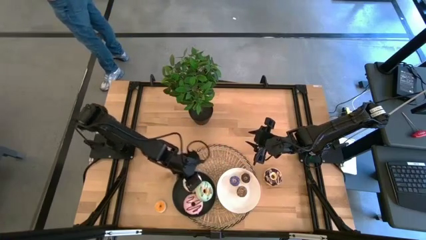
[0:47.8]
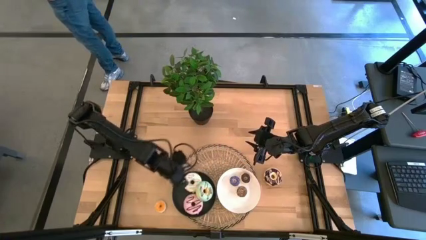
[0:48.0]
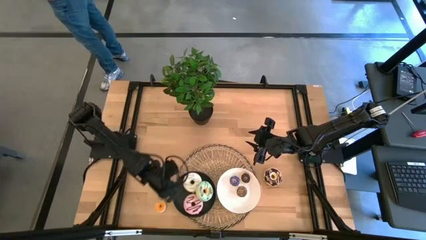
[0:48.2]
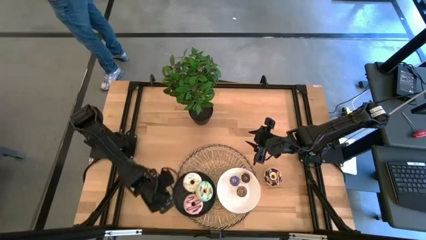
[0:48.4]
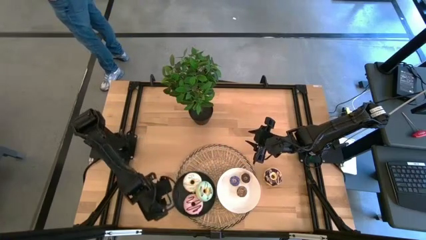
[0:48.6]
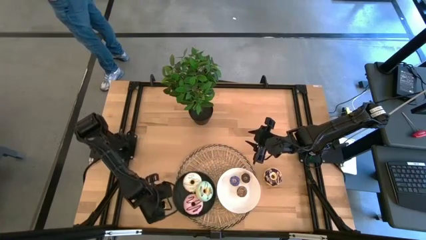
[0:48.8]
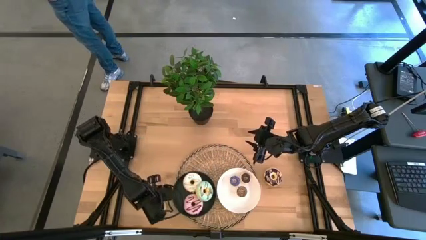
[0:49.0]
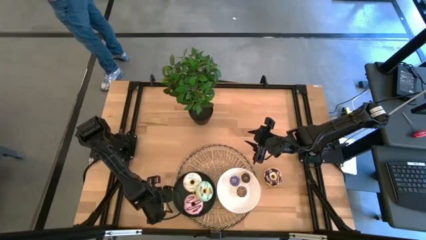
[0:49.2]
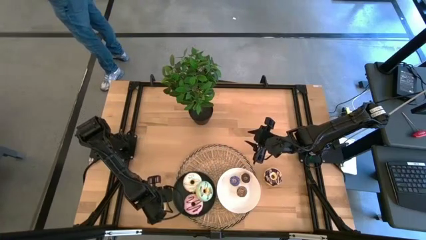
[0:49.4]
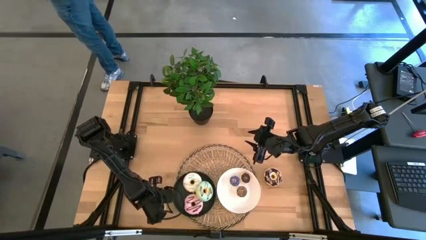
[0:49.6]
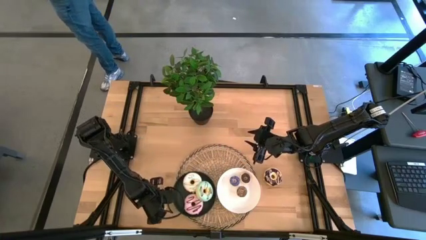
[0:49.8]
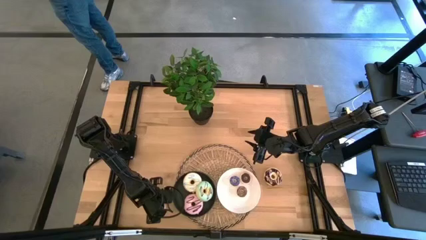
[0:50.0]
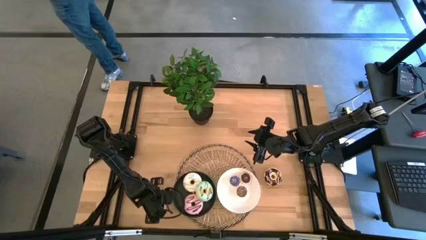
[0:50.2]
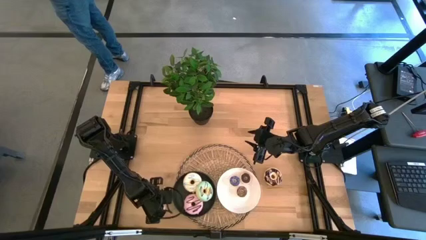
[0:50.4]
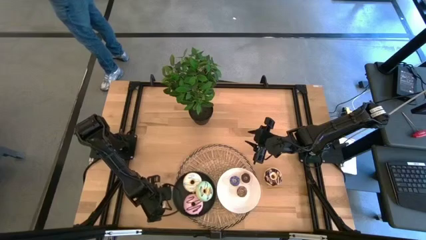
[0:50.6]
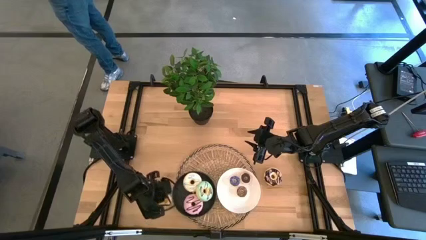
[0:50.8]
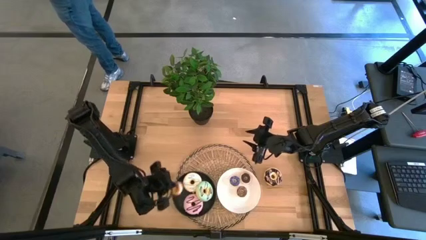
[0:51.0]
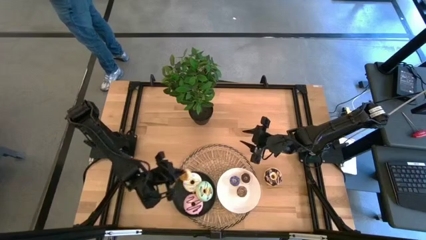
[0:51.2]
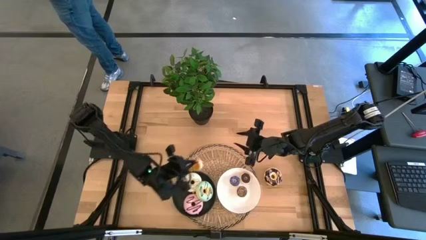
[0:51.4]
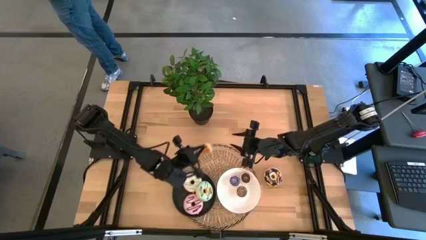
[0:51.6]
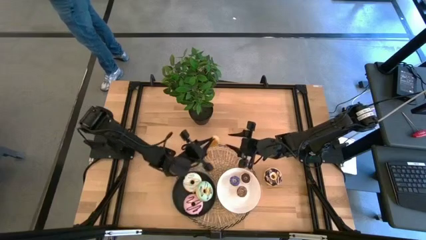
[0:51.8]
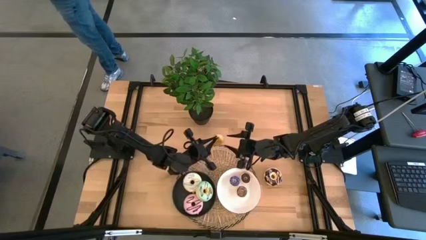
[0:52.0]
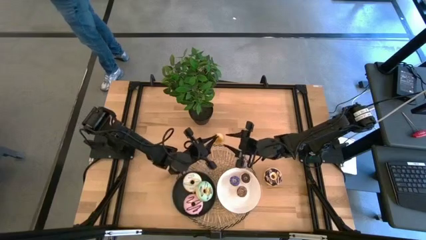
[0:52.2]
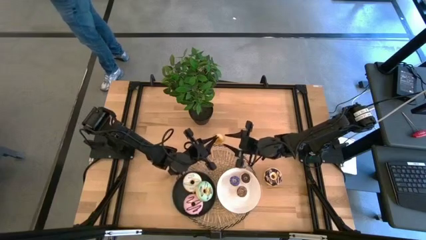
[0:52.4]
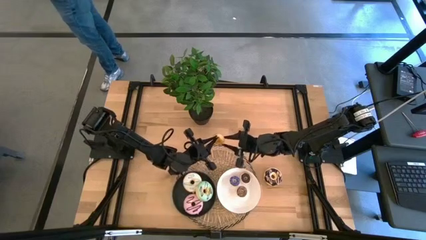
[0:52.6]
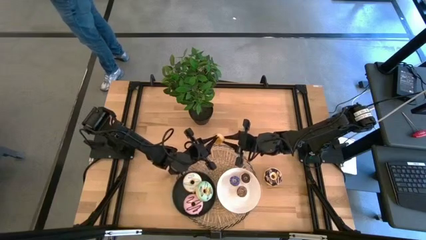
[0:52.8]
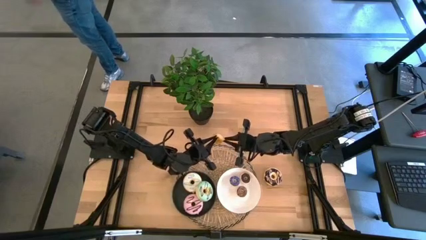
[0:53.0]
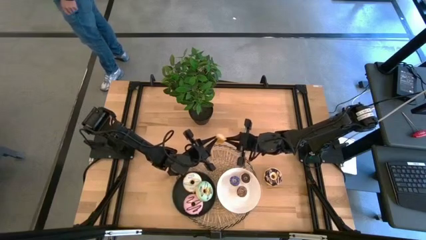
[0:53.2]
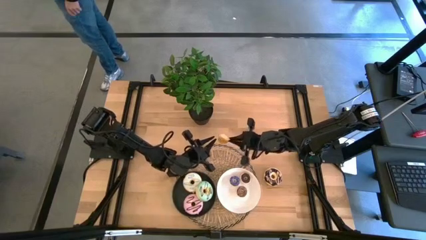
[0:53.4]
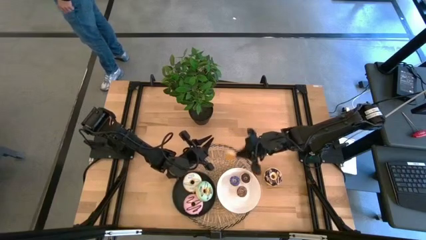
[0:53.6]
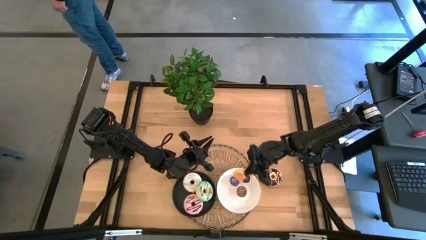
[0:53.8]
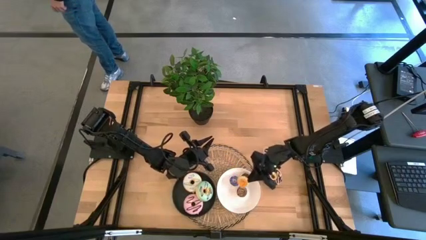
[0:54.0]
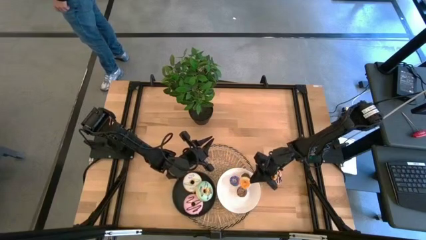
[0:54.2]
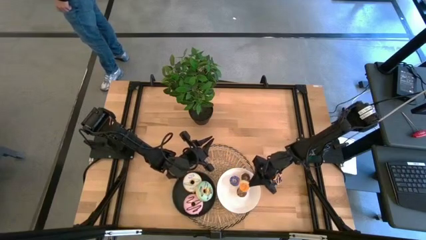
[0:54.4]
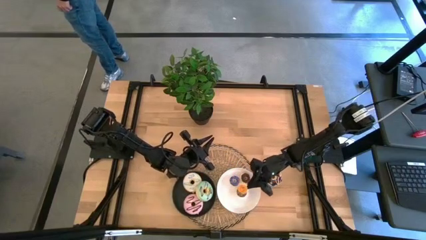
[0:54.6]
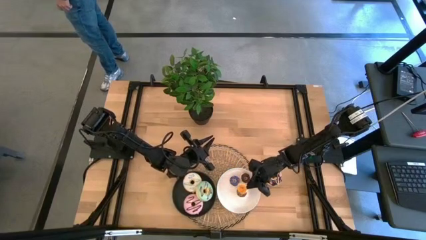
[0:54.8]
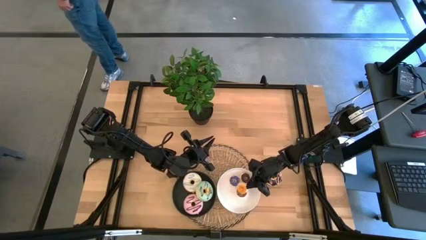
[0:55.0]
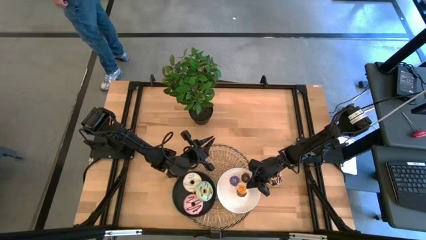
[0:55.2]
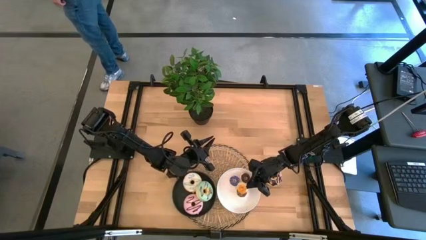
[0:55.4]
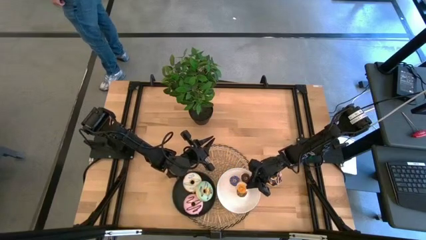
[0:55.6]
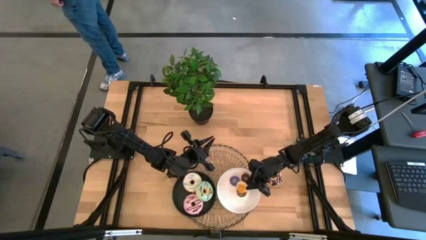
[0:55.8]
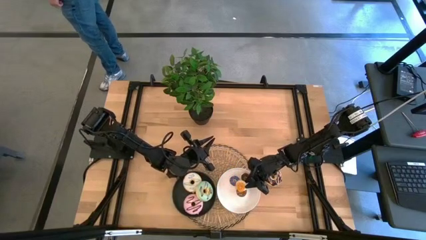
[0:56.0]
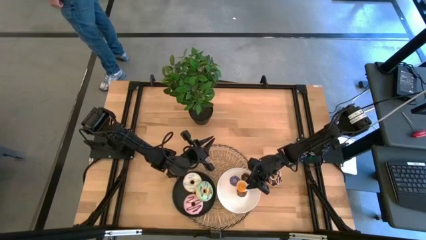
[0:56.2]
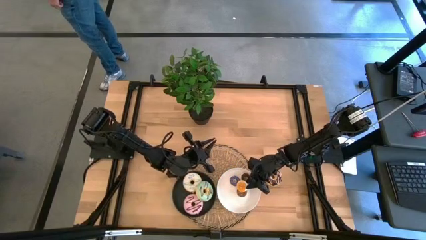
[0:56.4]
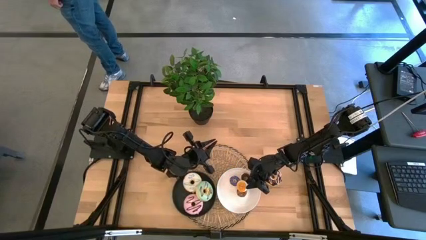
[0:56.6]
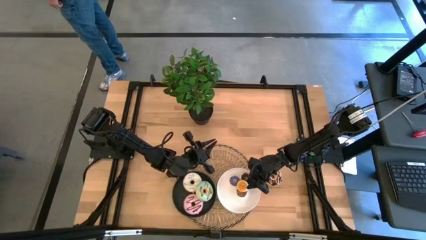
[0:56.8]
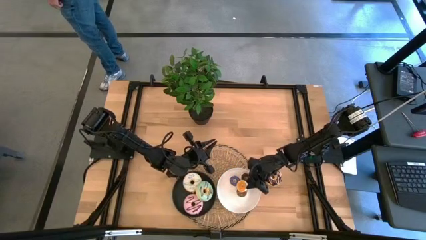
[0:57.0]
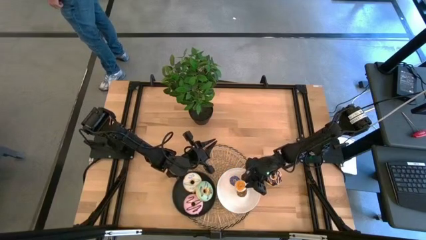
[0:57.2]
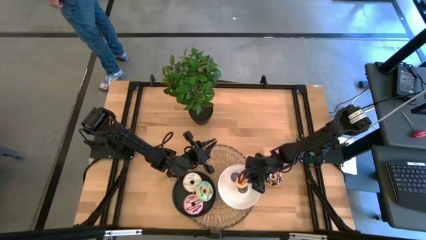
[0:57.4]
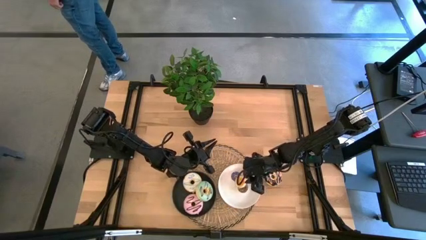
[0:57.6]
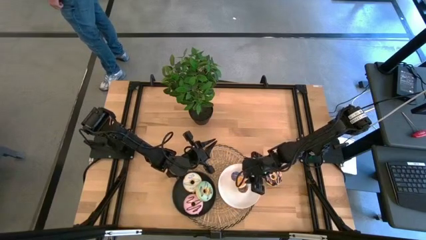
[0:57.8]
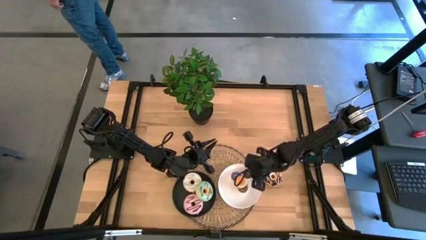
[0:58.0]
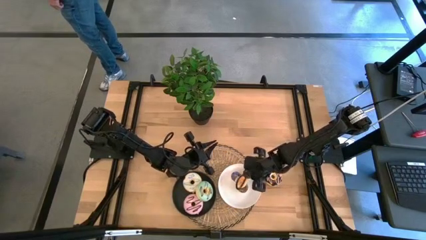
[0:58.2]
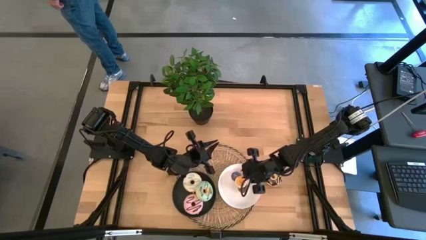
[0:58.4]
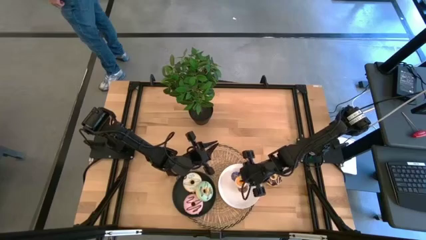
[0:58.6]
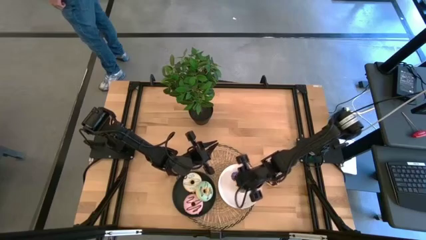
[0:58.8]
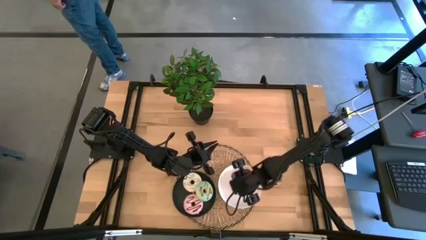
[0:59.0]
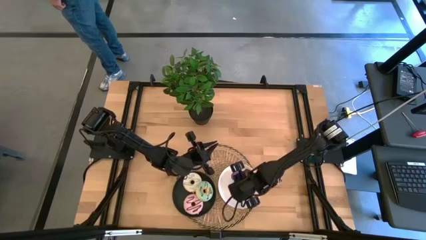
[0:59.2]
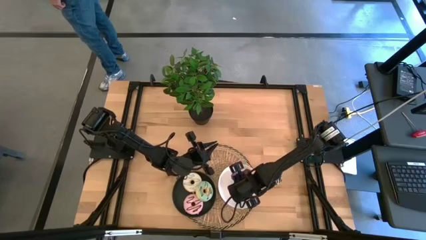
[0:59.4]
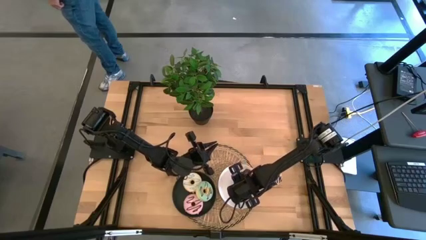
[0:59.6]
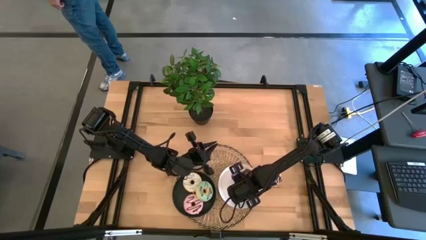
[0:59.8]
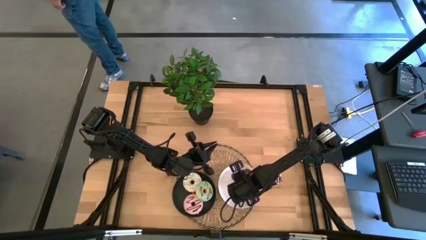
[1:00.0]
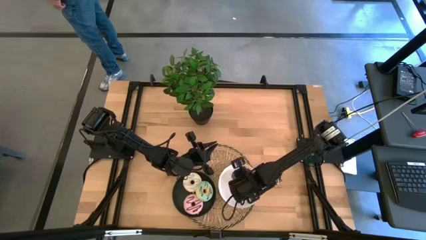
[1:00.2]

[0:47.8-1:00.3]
Task: Pick & Place donuts
Put the small yellow donut on the white plate
